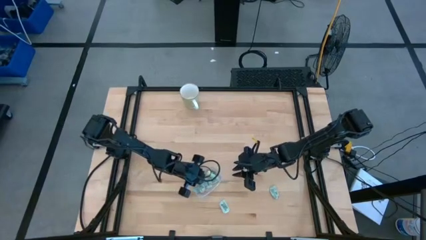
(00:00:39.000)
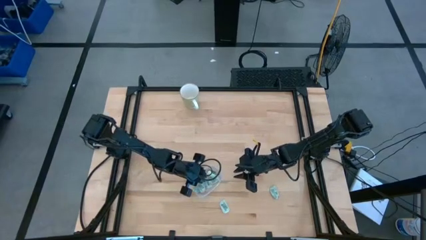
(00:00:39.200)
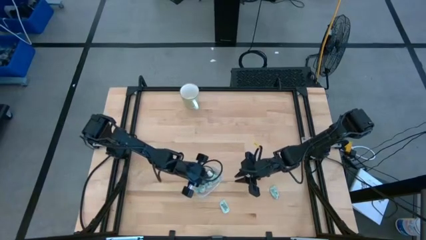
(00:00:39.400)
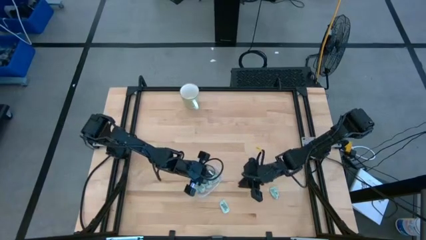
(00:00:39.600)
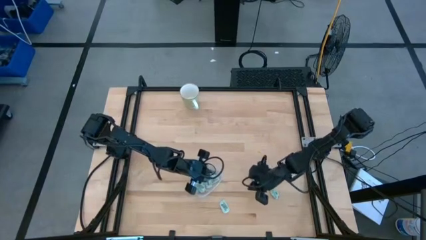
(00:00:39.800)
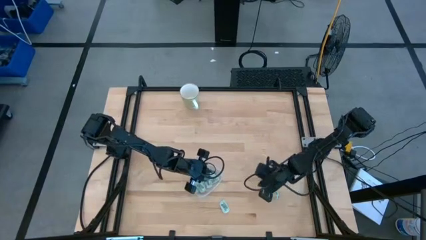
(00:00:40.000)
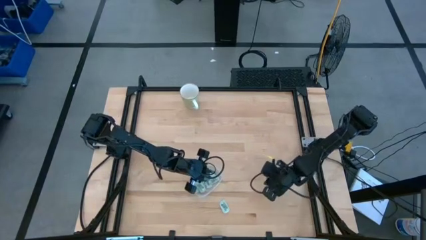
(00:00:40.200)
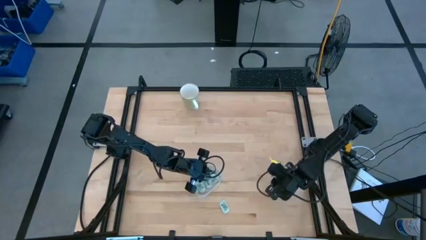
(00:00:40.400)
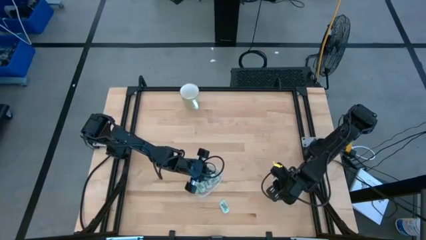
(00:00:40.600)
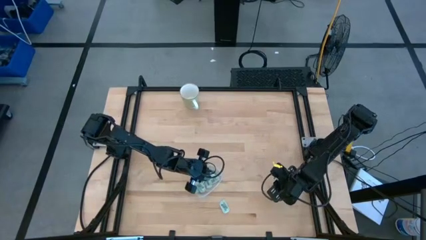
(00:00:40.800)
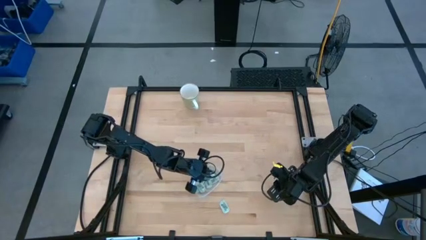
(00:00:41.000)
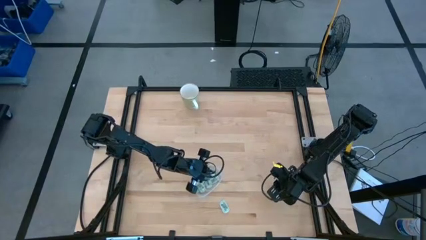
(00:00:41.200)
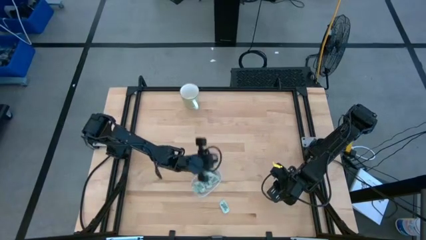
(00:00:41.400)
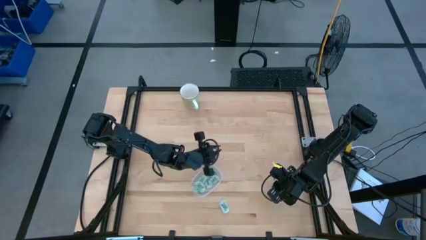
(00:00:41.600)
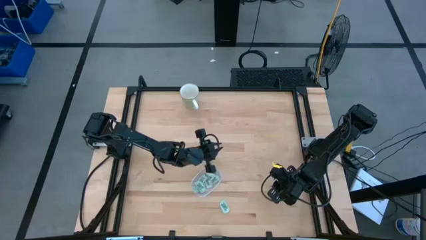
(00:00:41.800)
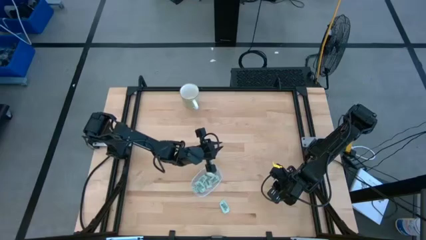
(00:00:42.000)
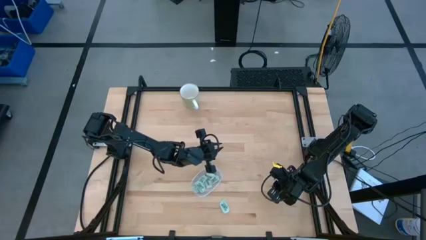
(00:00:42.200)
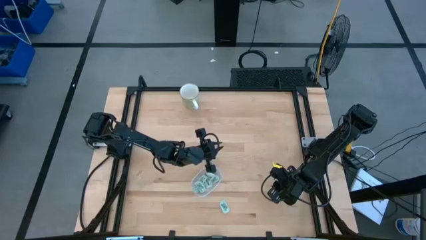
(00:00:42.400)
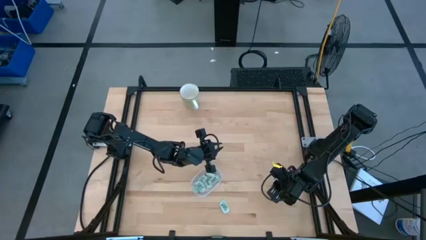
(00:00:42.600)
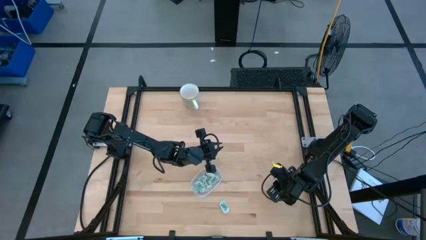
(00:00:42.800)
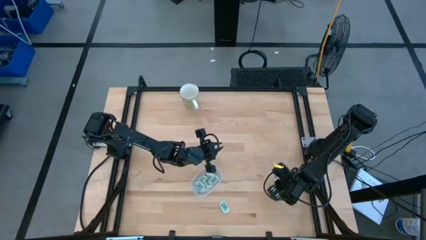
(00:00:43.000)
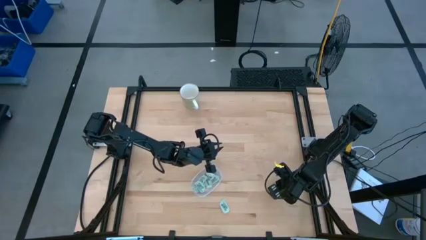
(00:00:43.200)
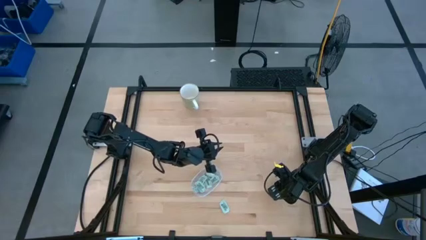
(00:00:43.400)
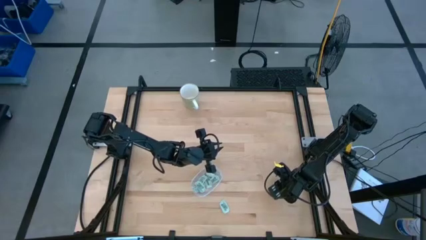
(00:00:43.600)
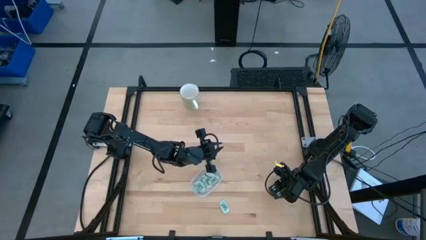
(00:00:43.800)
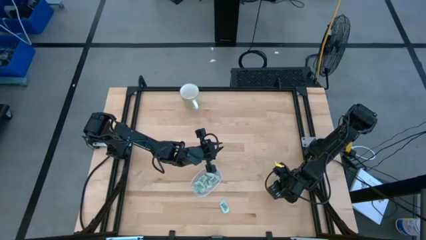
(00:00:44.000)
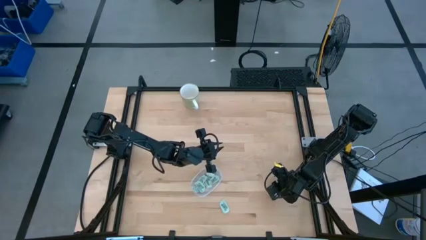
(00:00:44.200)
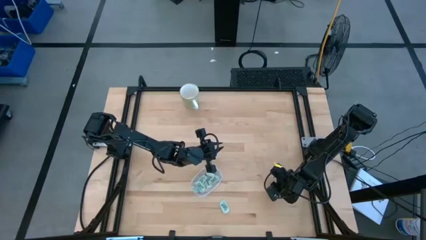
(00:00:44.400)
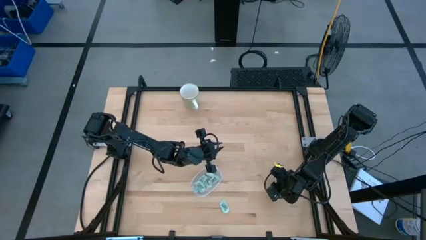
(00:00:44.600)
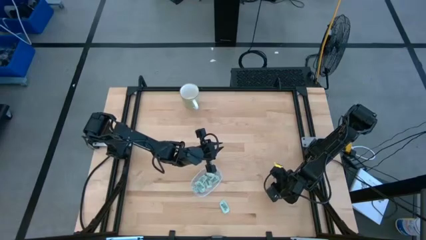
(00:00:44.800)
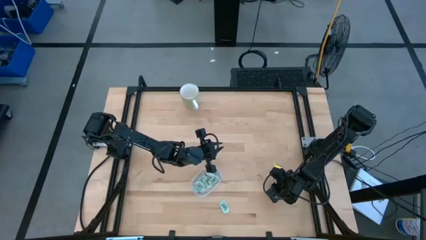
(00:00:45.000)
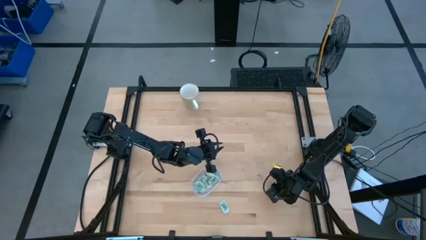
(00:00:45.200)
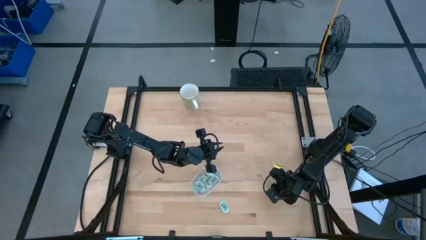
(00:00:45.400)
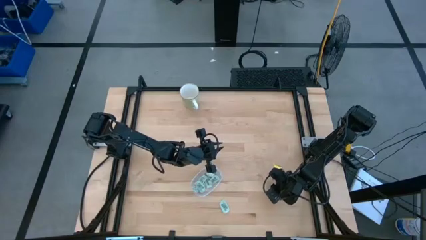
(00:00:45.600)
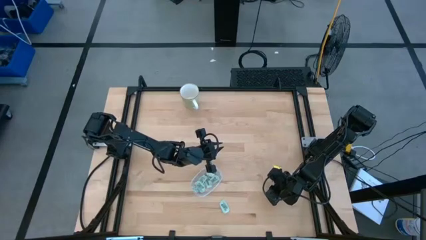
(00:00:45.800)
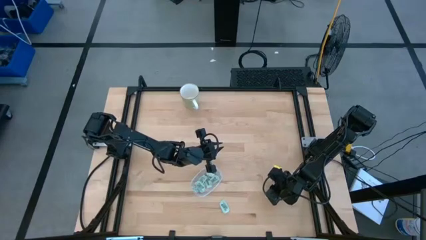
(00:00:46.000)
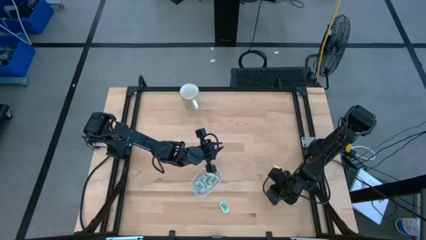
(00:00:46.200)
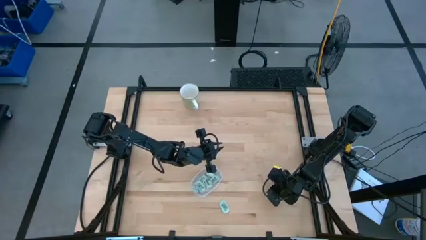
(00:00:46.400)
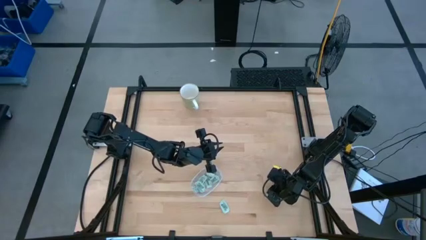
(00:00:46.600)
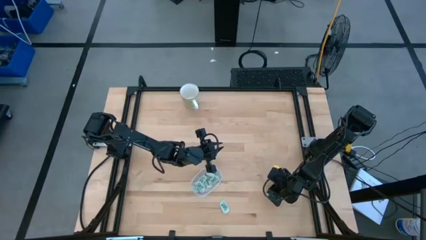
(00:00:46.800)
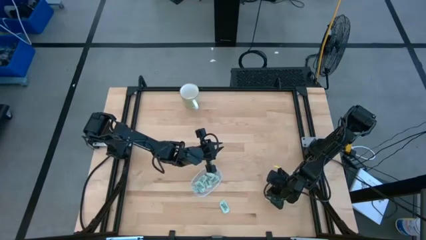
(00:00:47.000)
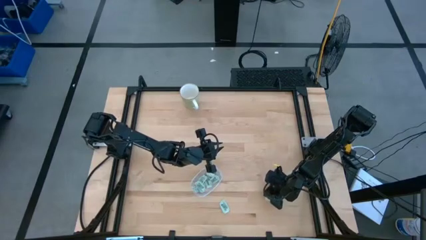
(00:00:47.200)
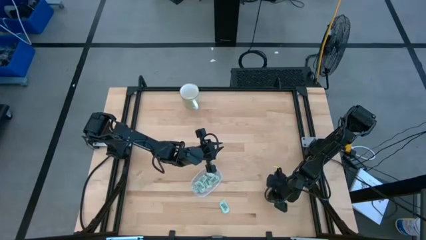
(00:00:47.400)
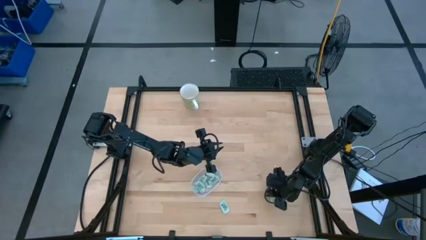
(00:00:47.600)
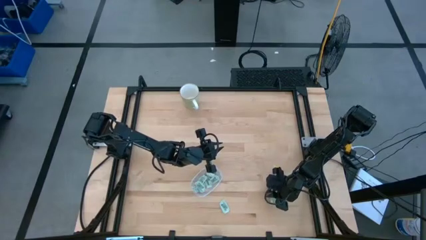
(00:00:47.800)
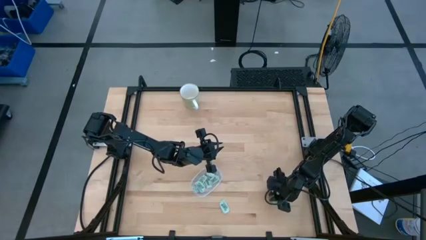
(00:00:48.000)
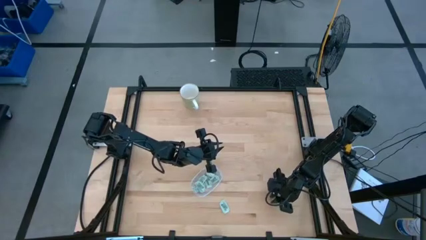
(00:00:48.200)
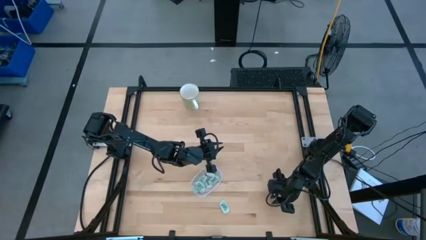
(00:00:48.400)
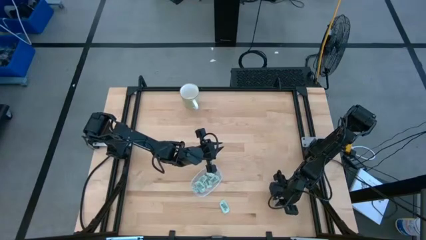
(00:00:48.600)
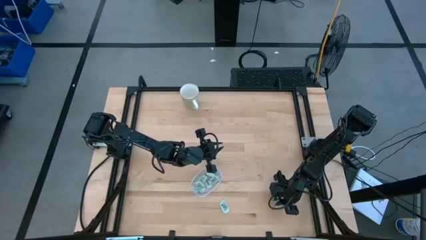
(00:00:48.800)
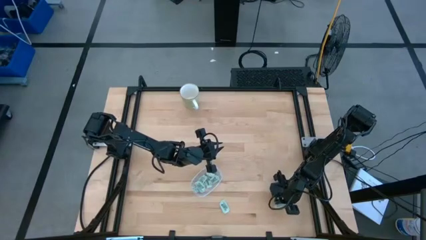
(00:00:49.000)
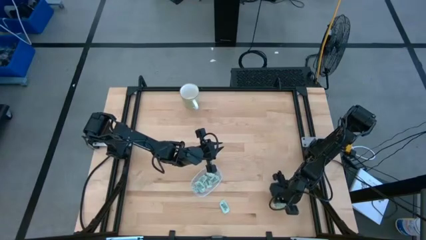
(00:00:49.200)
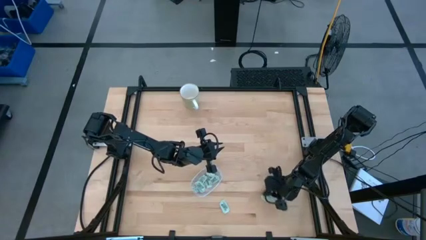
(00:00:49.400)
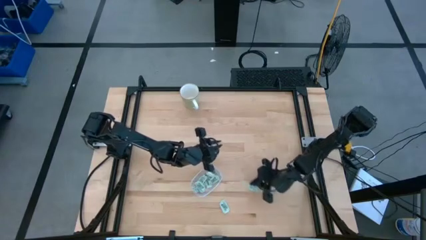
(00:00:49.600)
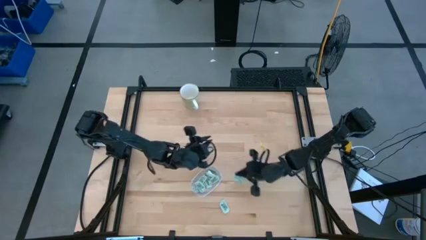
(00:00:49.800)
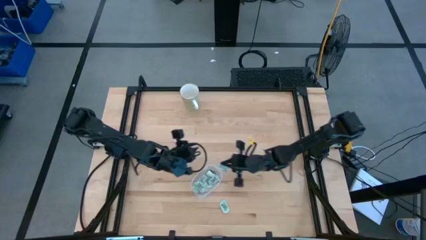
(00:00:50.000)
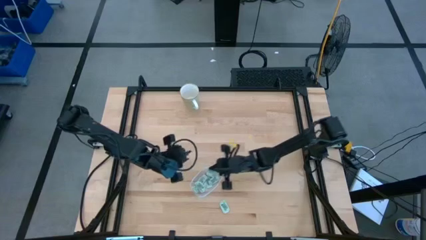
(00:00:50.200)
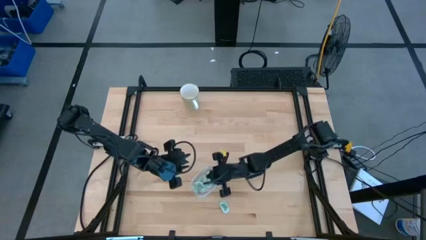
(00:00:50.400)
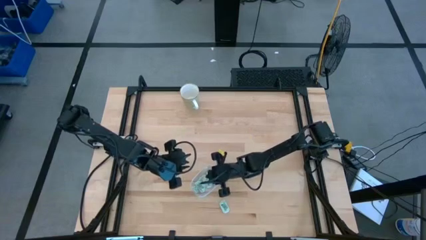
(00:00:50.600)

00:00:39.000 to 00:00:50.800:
Task: Pick and place Stevia / Truvia into bins
Put the light green stevia packet into the transparent bin

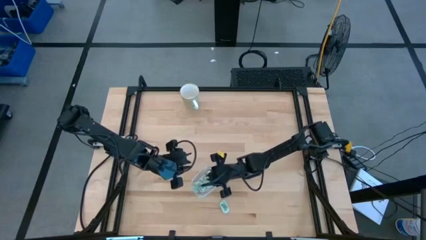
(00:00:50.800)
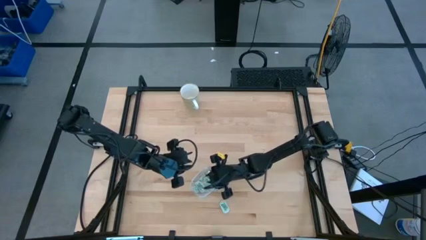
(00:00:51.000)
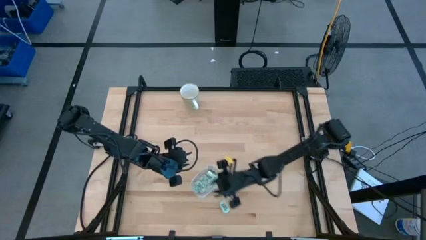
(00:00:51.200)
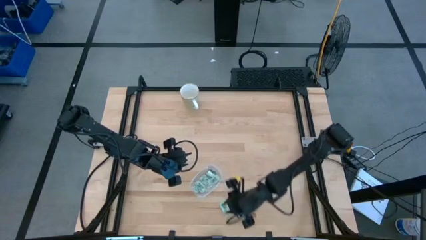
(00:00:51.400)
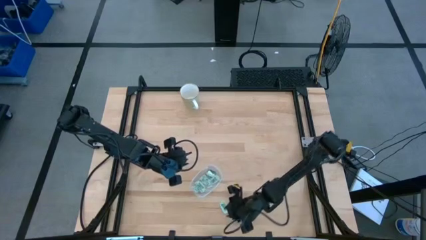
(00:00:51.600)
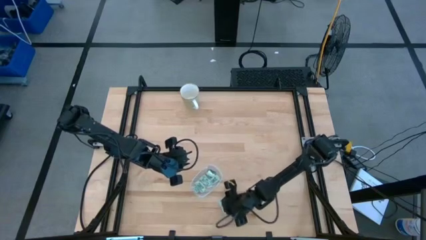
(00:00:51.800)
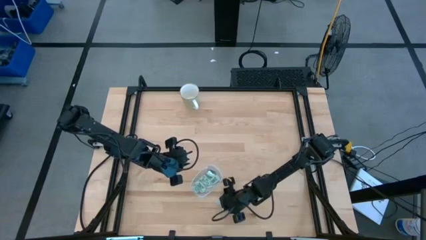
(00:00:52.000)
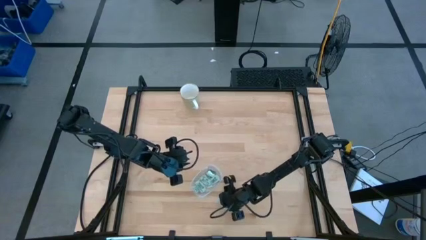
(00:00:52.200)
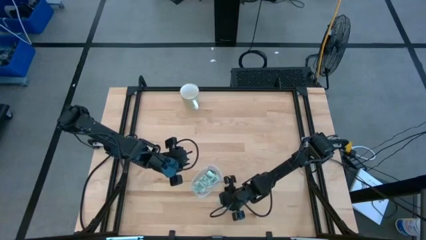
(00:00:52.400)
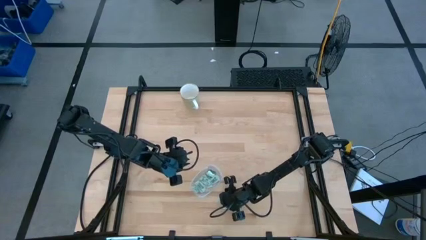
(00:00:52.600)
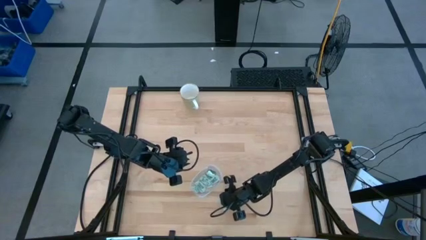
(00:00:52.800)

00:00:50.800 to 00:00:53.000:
Put the light green stevia packet into the transparent bin

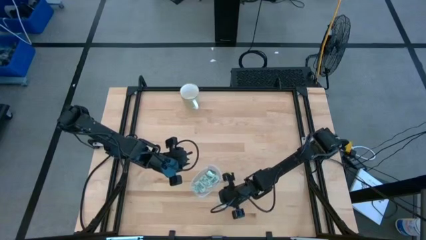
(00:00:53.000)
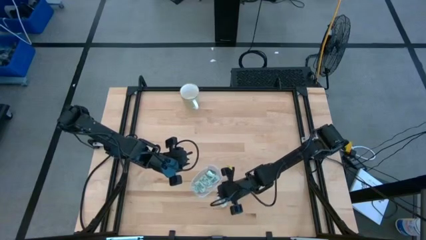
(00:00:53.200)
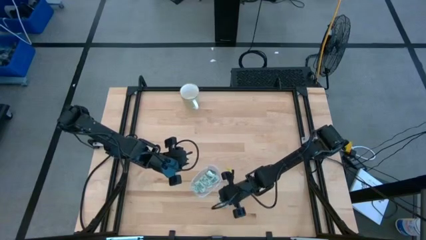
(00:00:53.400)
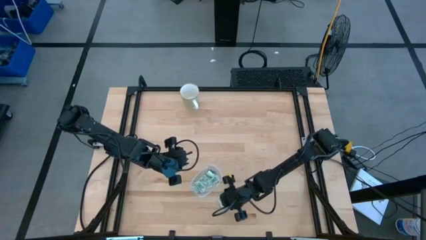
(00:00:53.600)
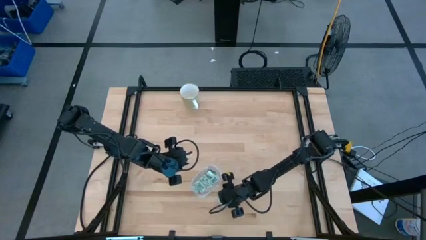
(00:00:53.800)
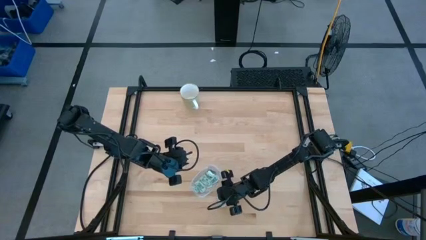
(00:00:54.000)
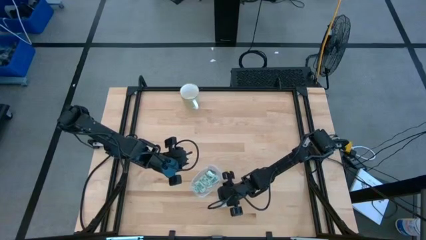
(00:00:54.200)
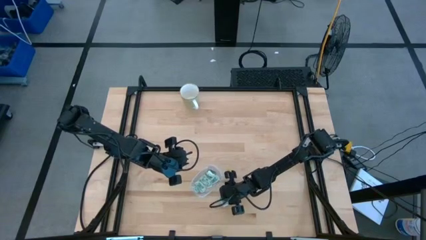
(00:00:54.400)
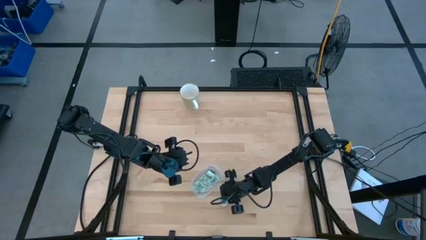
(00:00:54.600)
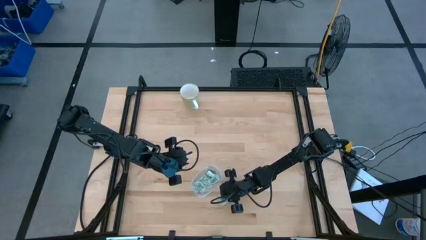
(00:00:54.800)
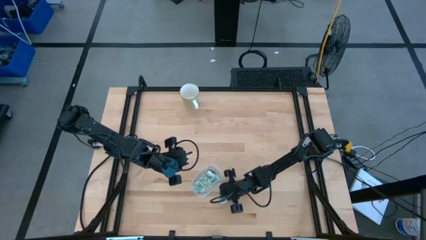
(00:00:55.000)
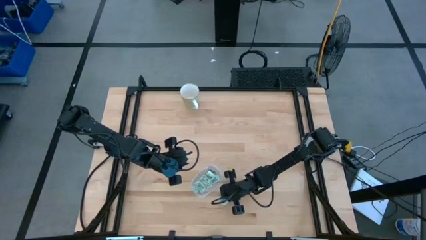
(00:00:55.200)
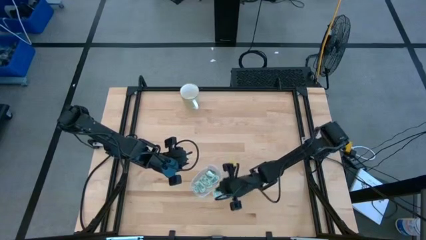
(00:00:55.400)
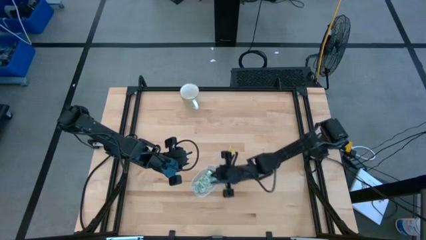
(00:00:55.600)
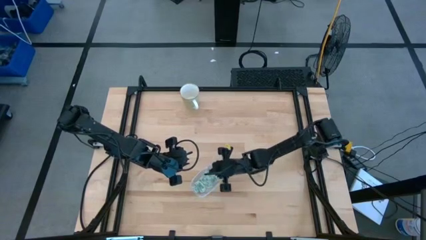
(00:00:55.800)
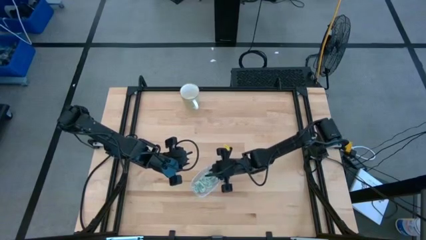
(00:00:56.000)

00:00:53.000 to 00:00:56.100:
Put the light green stevia packet into the transparent bin
